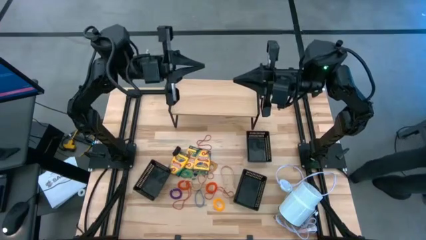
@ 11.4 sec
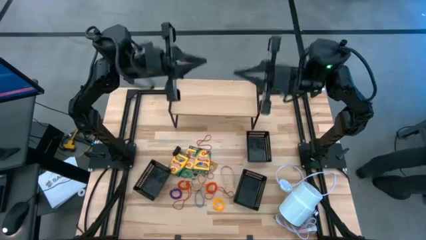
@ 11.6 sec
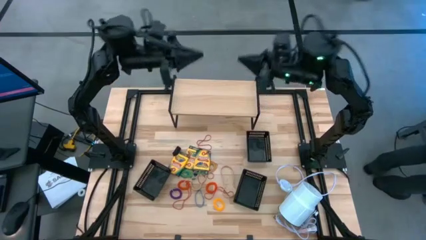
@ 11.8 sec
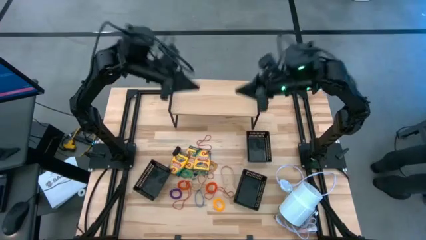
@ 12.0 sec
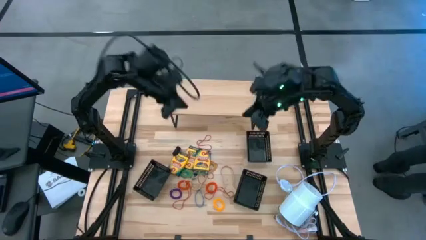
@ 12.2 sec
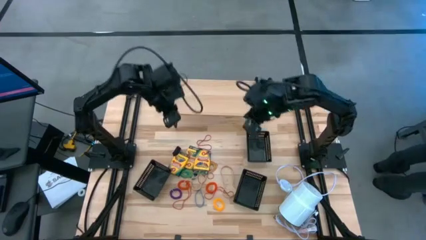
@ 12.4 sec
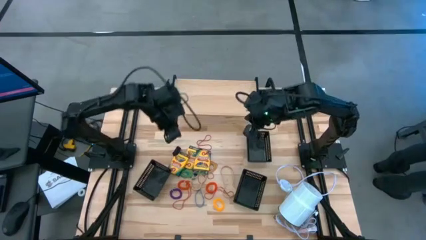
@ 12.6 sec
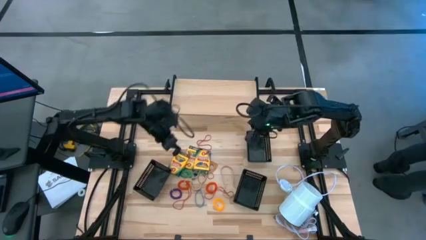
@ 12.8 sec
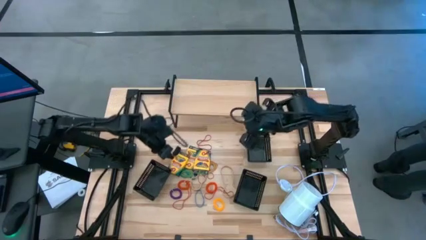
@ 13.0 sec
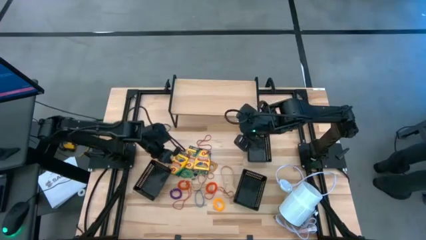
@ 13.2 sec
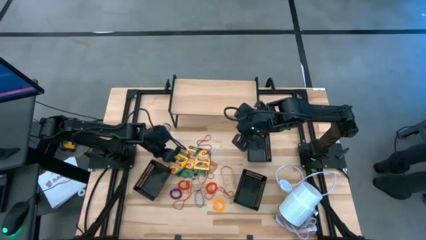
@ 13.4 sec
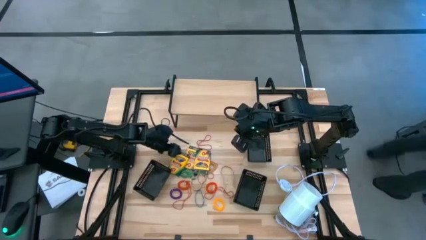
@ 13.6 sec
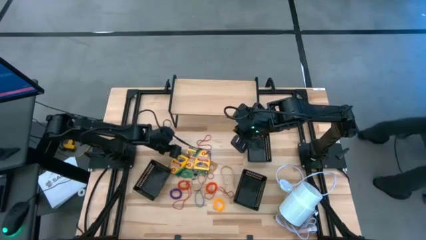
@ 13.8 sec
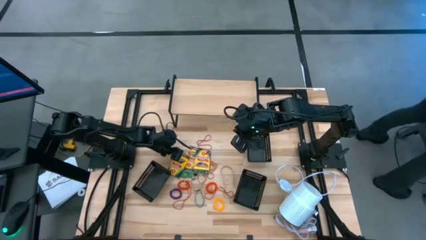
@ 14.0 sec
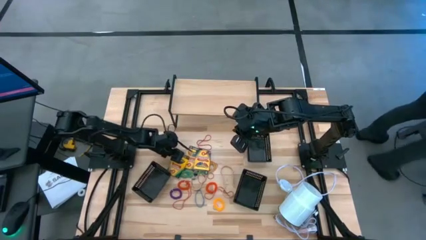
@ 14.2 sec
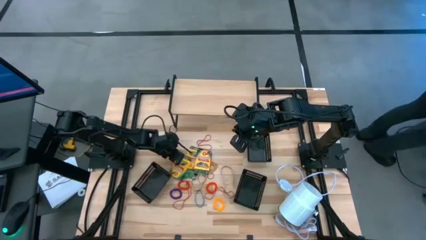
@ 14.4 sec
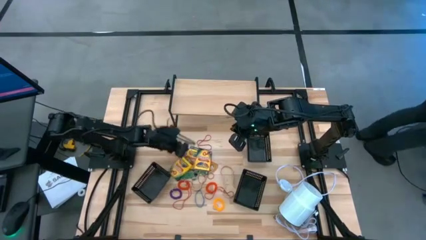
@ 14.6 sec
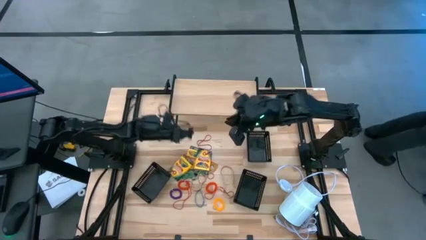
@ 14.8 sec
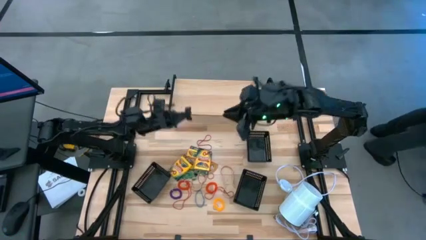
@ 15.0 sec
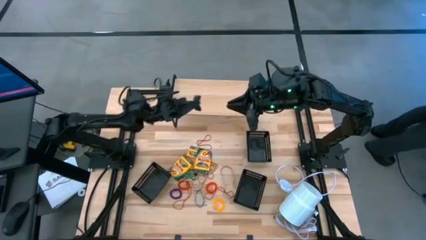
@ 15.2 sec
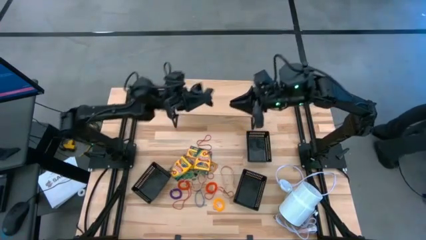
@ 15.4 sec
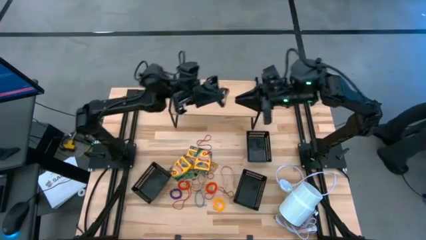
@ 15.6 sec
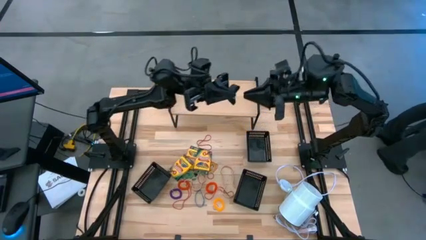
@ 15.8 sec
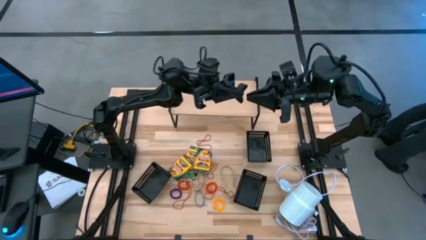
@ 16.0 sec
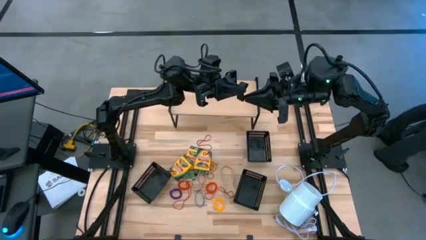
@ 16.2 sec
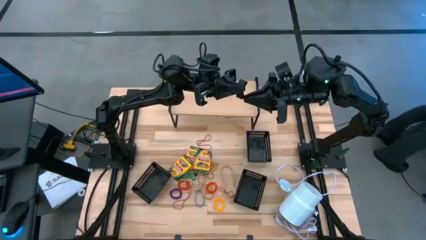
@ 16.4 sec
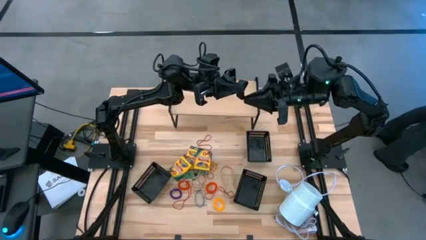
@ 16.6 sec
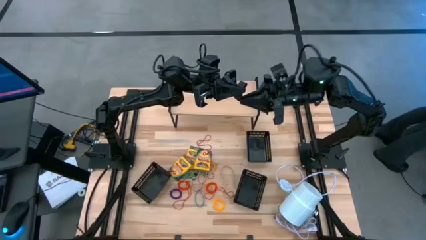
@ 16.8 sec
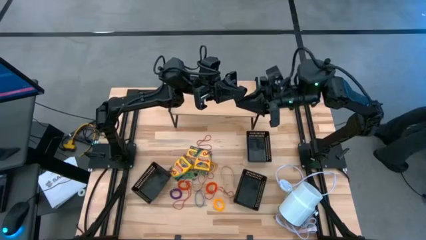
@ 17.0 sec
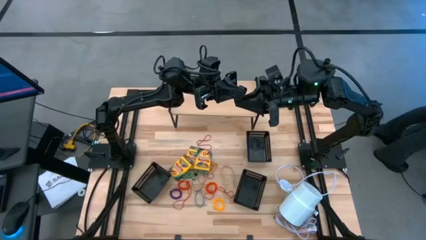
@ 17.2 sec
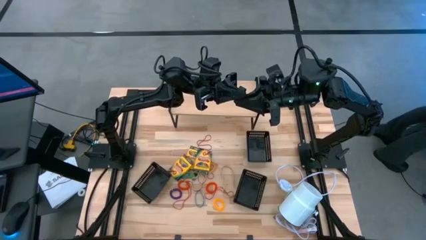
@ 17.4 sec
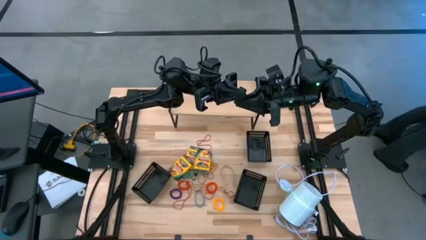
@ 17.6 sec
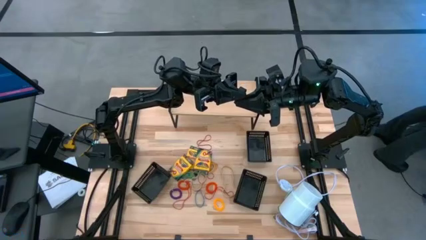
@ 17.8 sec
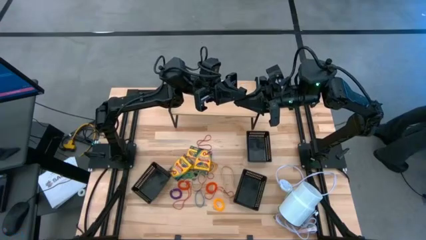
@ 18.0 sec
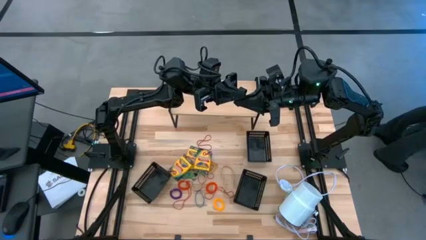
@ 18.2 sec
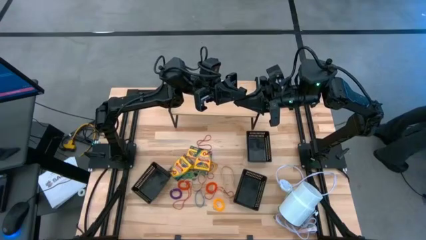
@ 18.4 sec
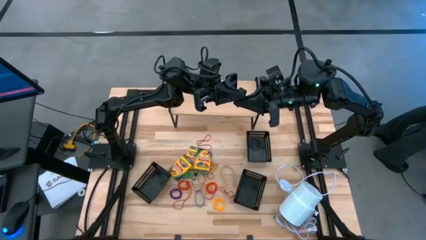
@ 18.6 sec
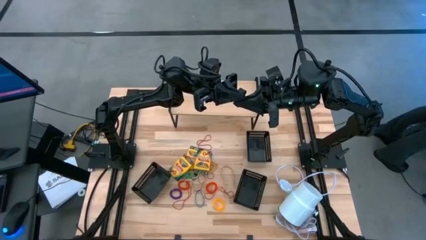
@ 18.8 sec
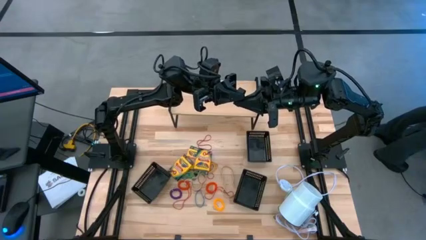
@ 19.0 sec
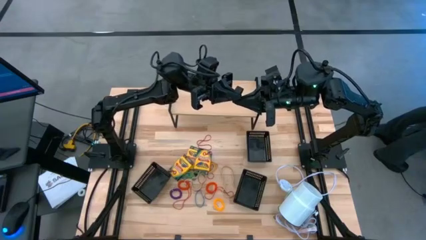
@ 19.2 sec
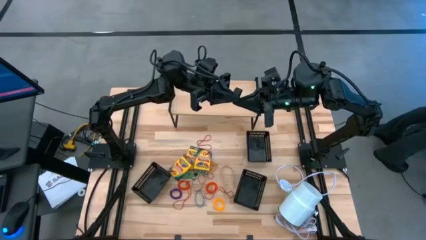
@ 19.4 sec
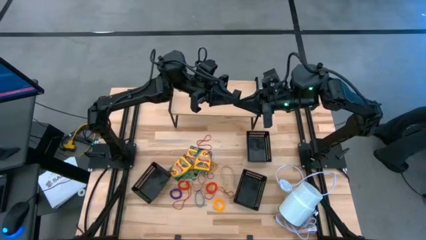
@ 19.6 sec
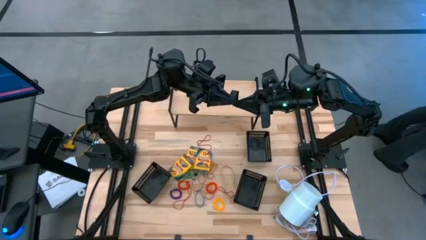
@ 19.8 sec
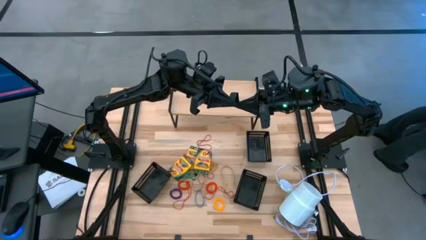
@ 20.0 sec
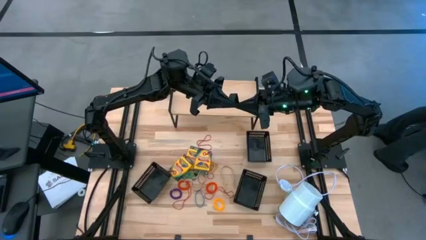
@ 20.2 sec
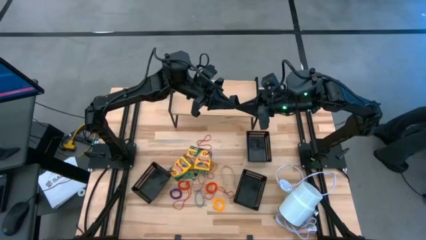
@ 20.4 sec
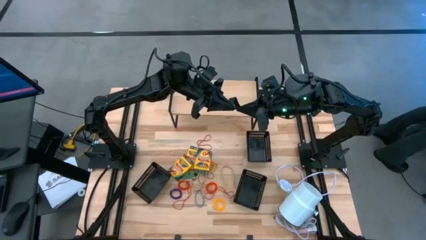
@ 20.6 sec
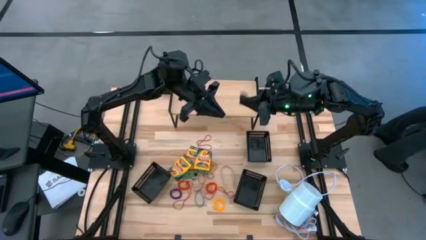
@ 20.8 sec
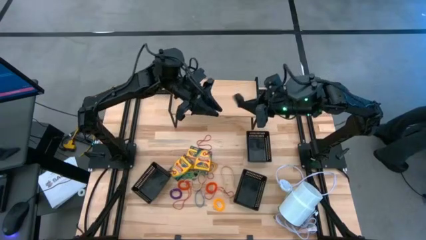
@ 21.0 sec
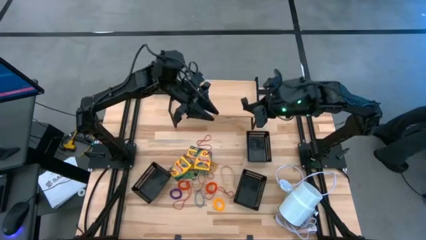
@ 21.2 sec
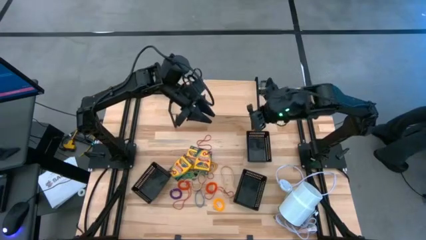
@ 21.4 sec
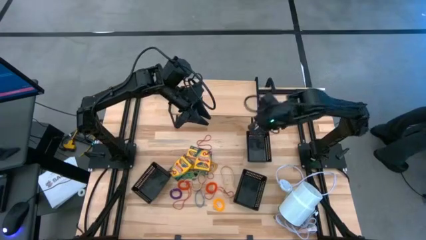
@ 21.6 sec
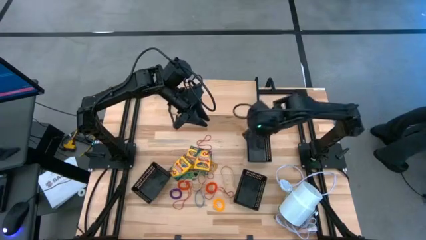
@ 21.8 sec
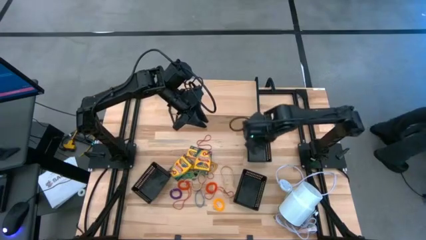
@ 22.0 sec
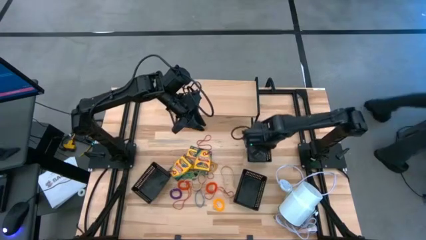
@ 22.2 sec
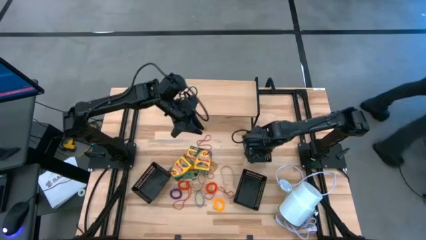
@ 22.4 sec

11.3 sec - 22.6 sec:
Task: Pick & Place Office Desk Supplies
Put the black rubber band into the top right black bin

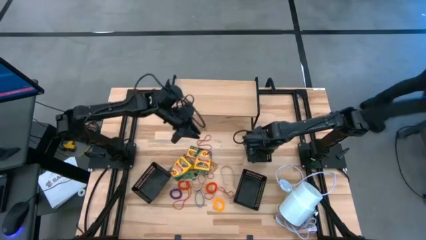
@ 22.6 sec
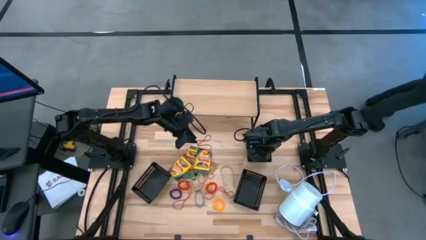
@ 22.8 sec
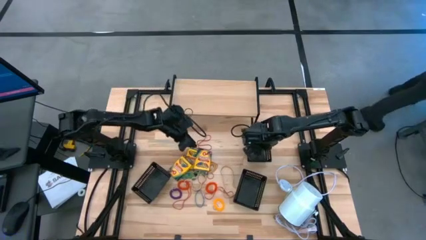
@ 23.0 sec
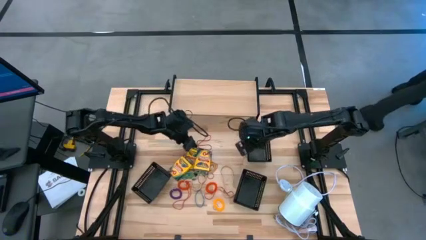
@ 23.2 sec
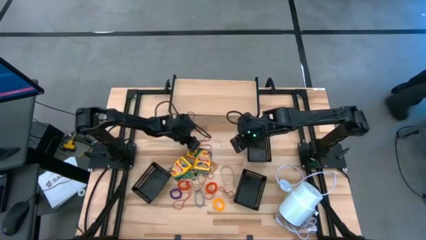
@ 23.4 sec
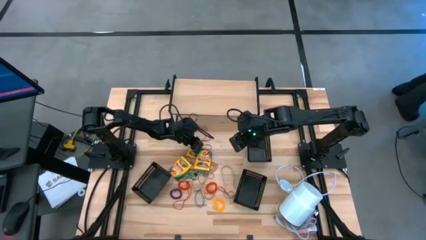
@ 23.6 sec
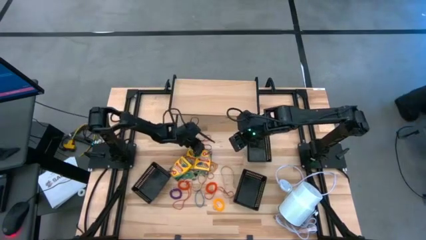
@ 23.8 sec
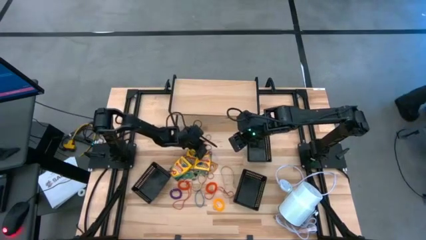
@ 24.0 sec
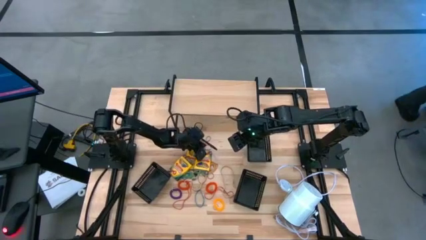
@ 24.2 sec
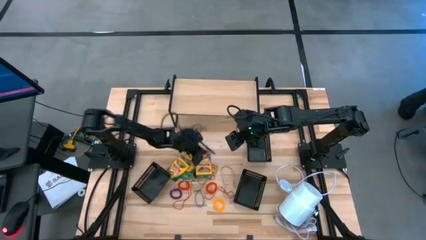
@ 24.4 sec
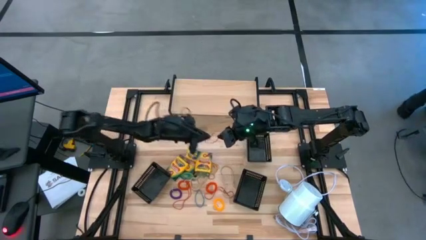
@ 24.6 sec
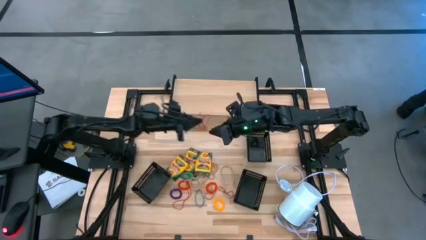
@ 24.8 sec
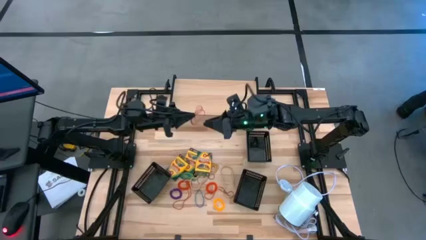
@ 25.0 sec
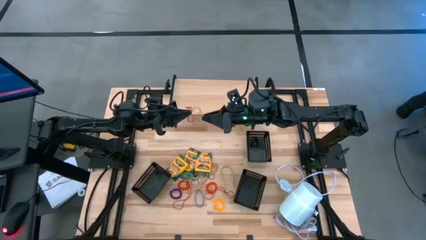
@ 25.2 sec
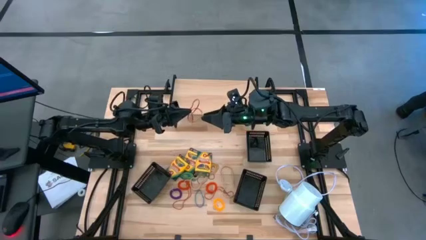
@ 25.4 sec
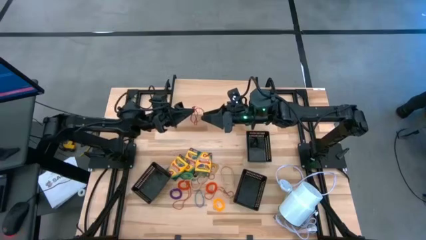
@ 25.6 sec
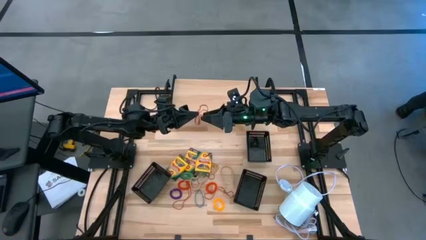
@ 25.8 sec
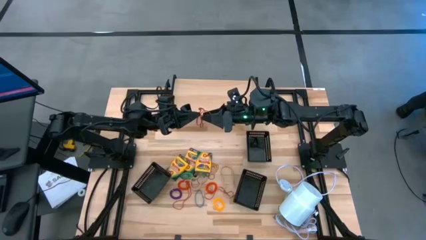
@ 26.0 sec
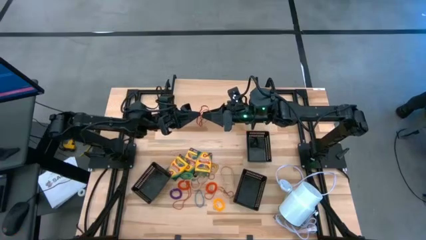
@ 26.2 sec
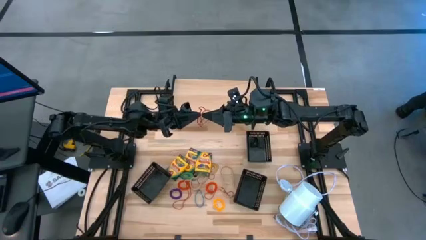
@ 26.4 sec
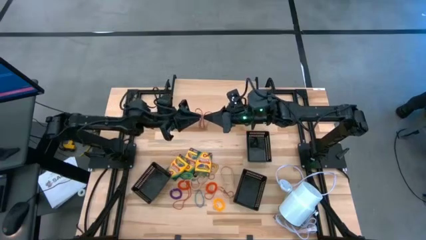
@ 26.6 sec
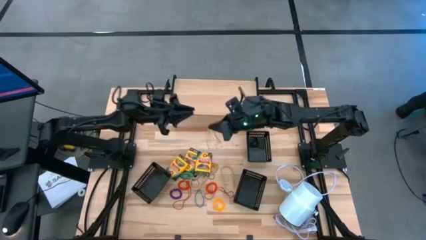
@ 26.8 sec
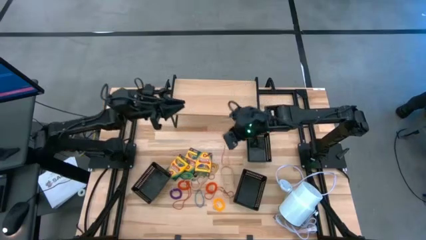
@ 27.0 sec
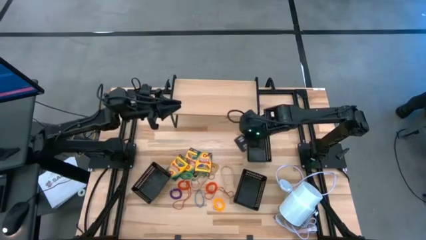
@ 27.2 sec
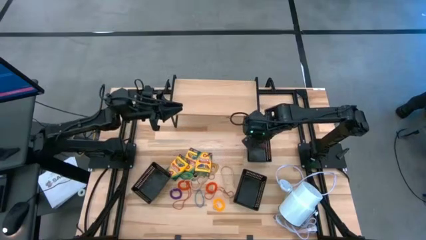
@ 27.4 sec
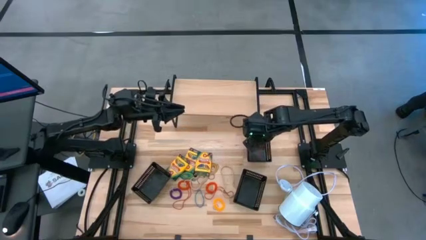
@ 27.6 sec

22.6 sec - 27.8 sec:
Put the red rubber band into the top right black bin
